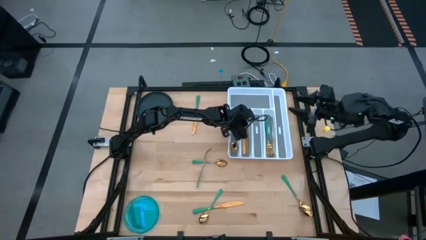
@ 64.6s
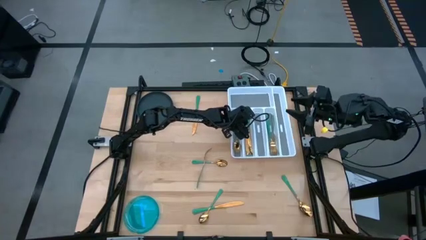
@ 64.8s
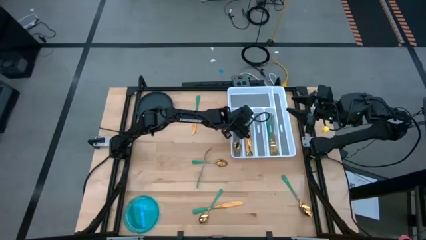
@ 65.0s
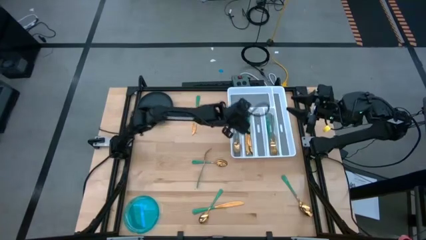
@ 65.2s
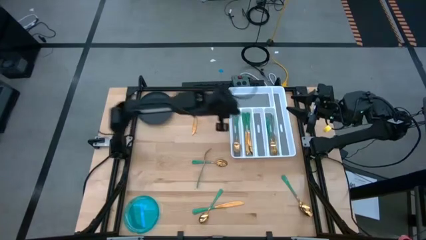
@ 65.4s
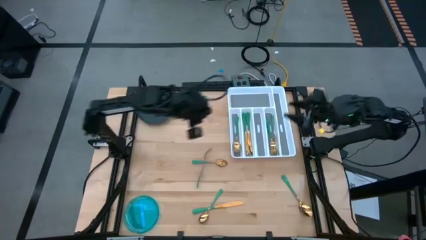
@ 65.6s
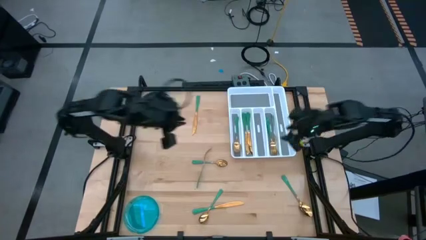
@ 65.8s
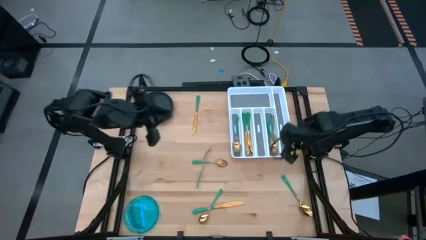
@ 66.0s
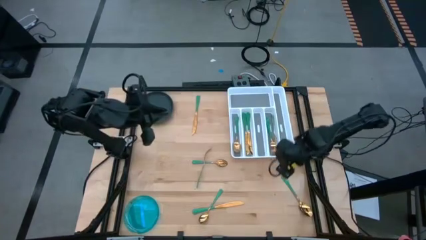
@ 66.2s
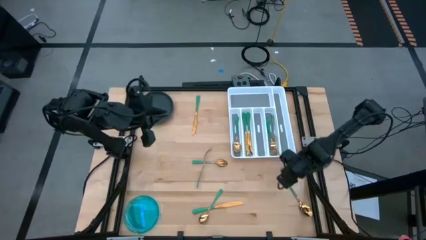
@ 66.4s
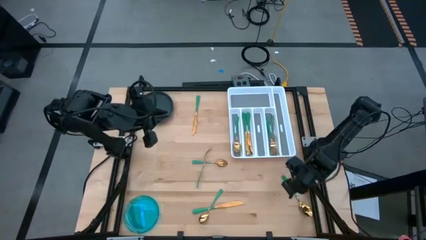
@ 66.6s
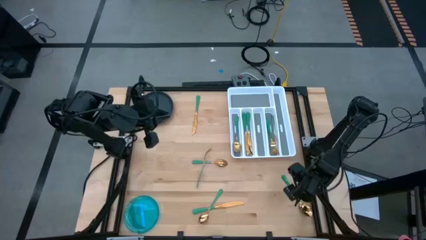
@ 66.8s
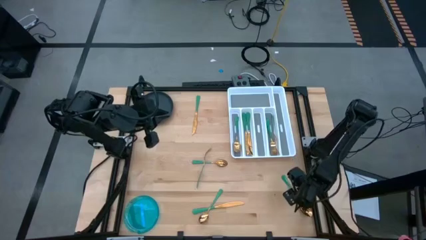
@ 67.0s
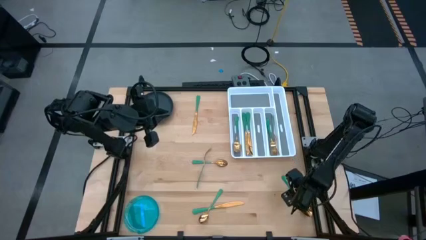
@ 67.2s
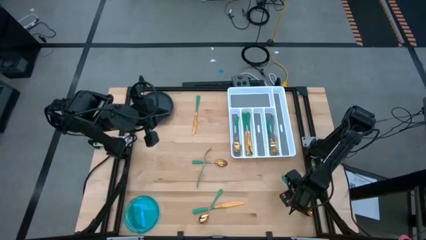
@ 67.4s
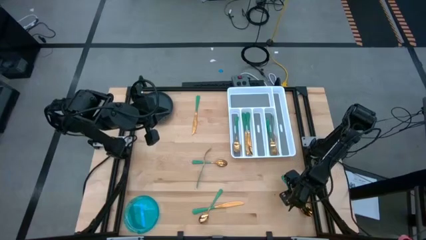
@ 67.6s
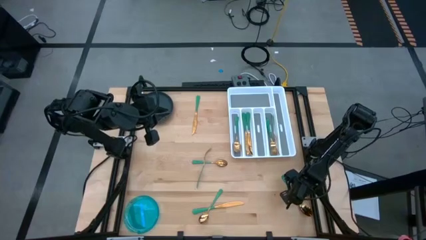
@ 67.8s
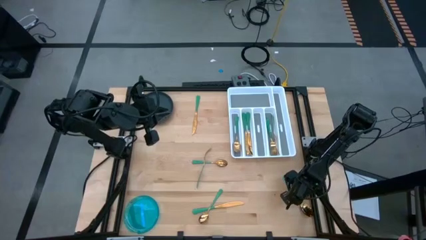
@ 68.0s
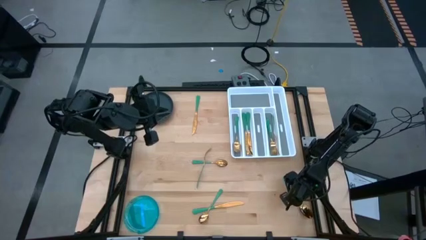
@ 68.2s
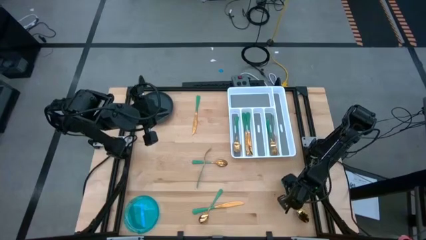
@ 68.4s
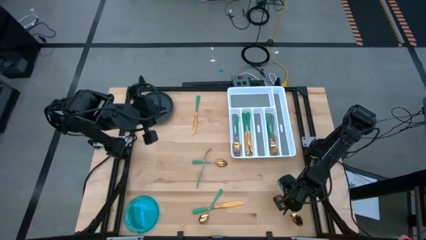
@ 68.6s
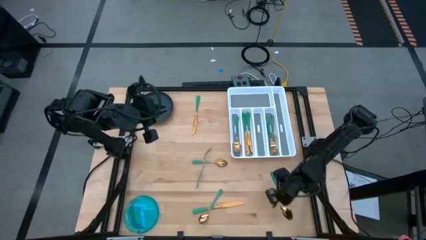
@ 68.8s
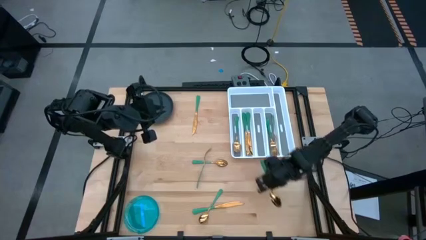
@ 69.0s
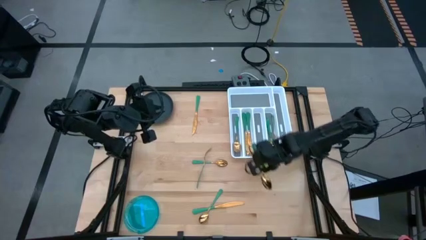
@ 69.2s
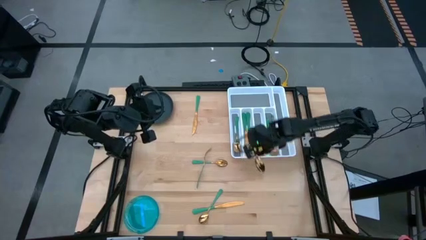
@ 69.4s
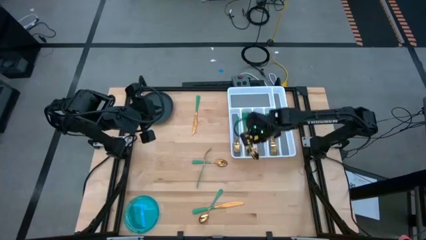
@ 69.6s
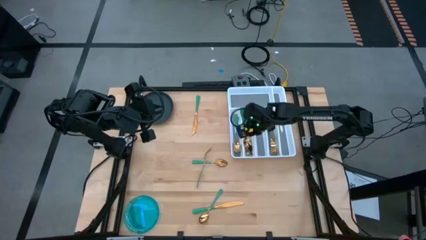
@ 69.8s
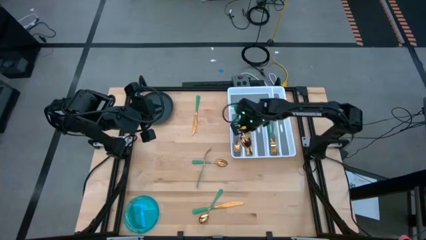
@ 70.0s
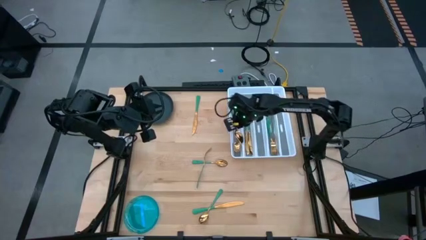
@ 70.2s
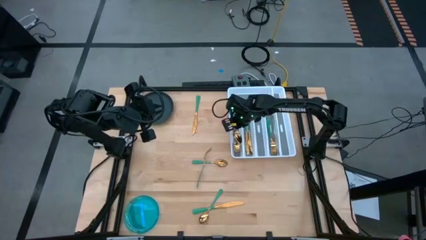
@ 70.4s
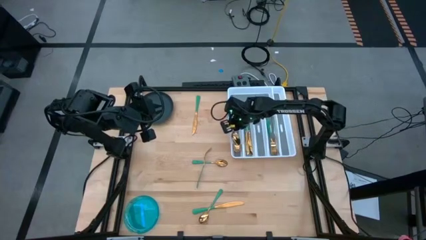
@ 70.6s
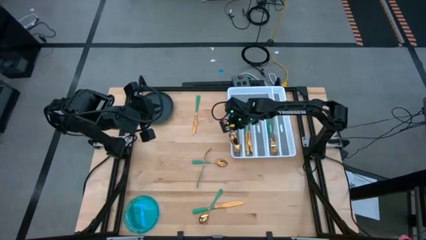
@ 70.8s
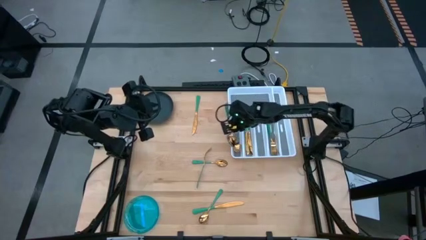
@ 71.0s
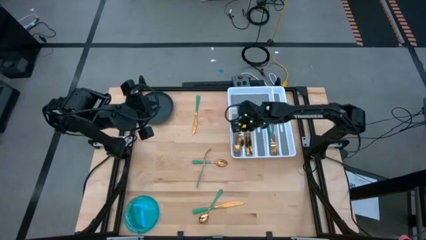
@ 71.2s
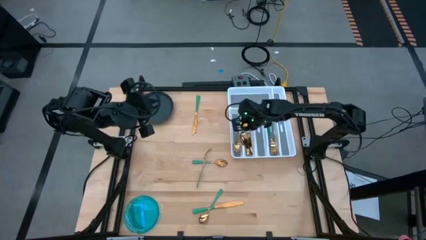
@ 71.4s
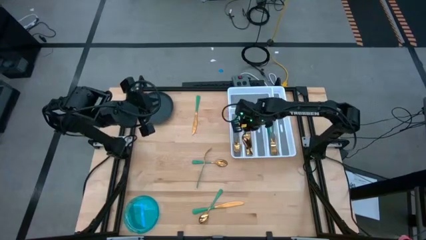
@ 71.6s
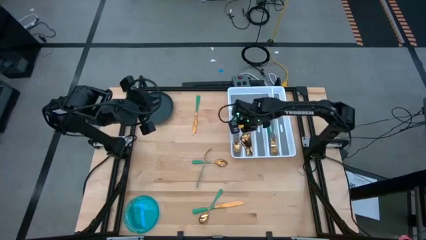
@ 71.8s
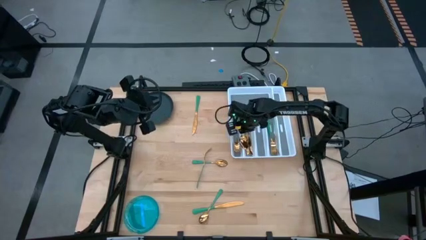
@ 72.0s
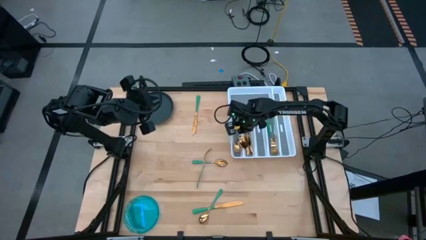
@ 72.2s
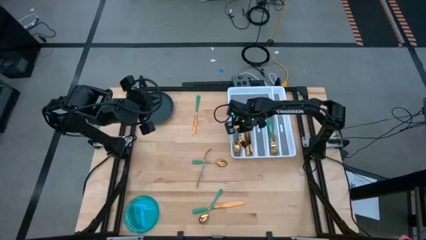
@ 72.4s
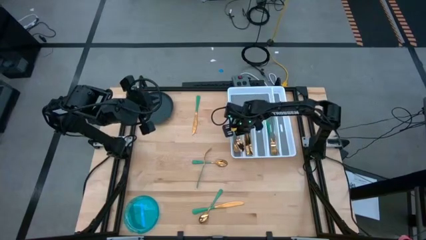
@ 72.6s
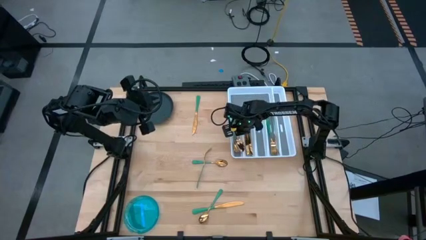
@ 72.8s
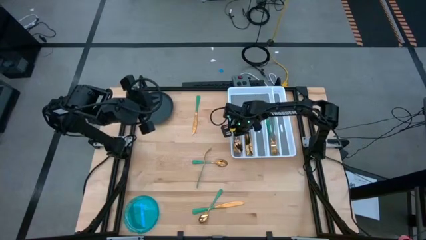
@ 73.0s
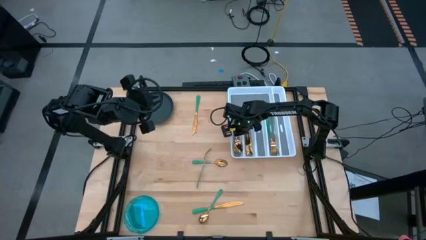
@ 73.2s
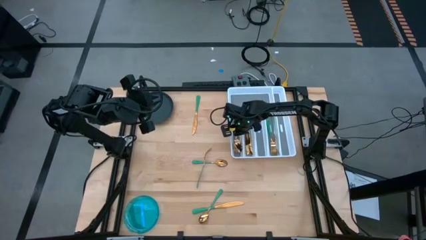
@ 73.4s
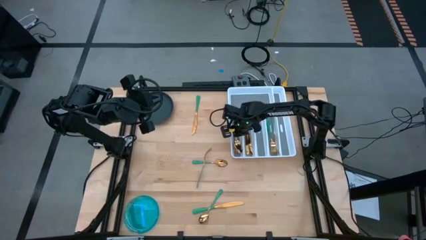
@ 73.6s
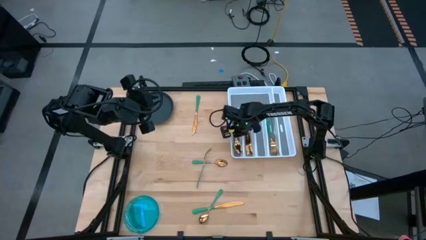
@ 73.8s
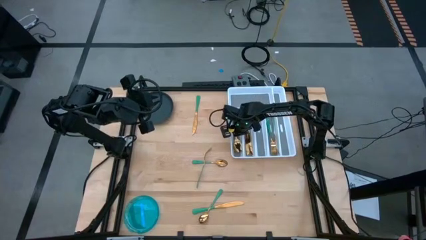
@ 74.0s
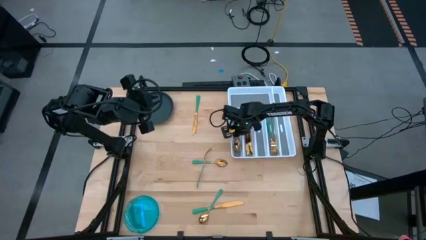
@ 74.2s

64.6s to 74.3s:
Task: Sort silverware
Put the bottom right green spoon on the silverware tray with the other green spoon

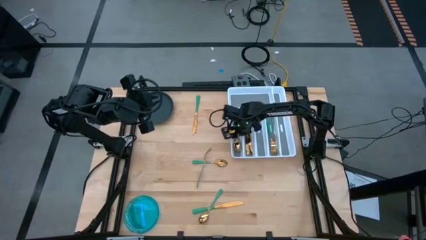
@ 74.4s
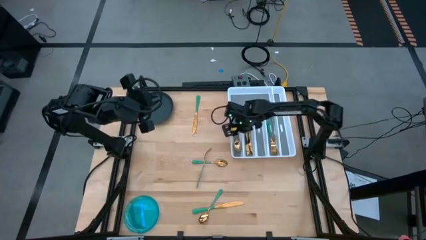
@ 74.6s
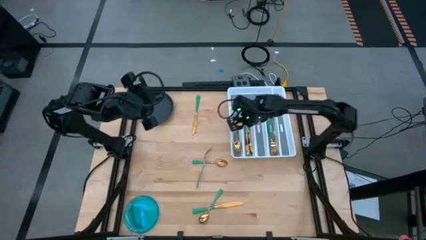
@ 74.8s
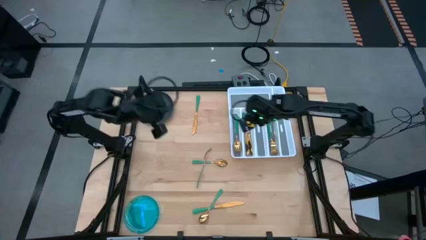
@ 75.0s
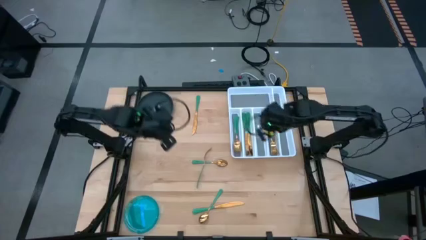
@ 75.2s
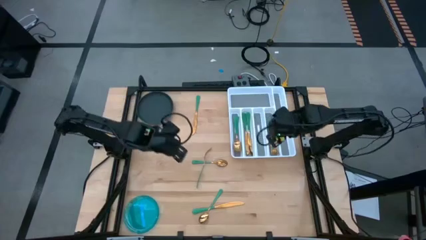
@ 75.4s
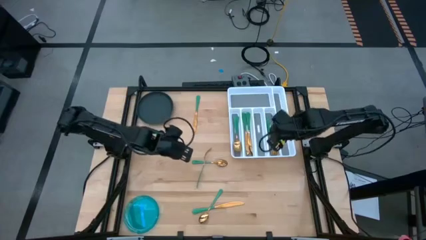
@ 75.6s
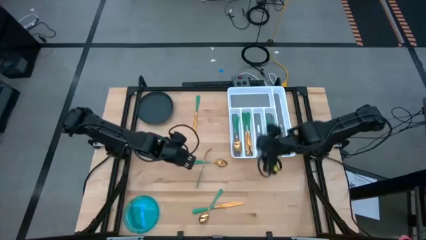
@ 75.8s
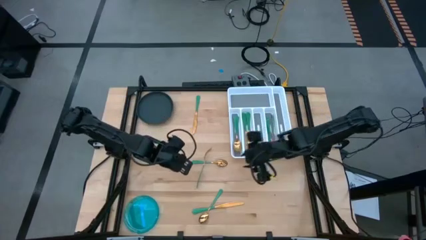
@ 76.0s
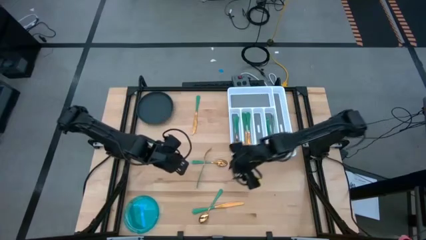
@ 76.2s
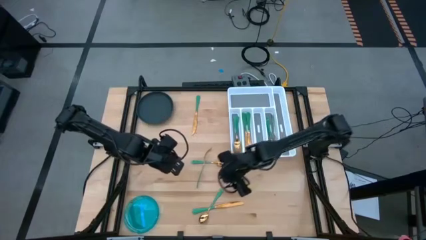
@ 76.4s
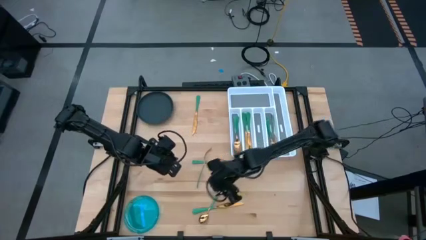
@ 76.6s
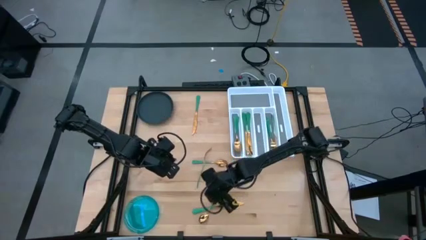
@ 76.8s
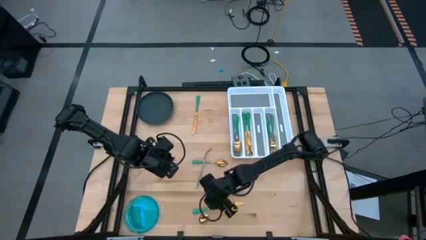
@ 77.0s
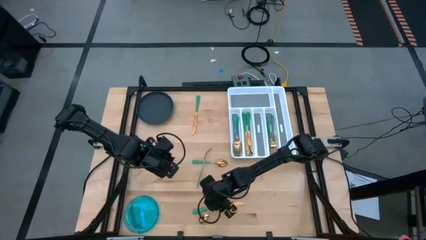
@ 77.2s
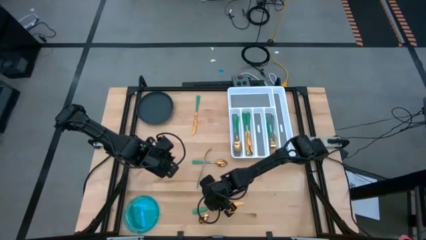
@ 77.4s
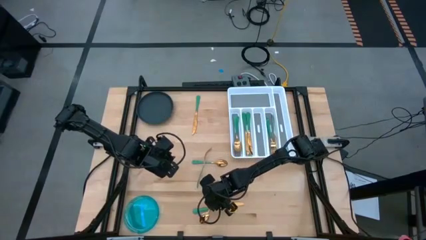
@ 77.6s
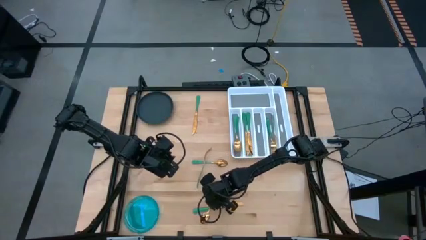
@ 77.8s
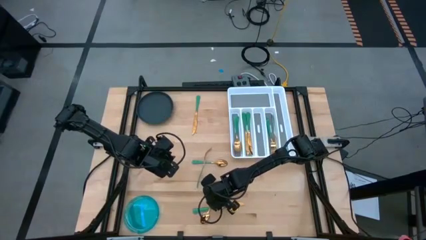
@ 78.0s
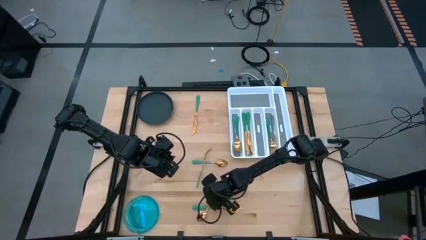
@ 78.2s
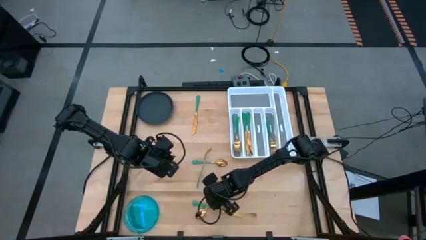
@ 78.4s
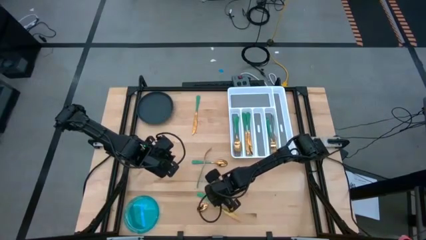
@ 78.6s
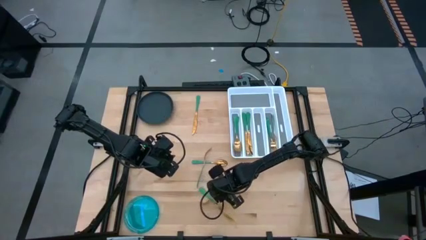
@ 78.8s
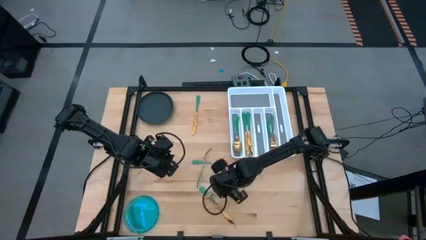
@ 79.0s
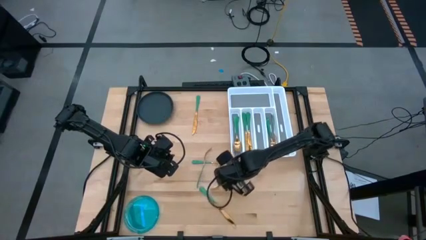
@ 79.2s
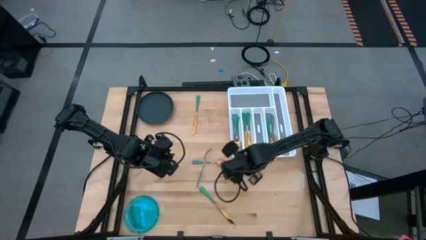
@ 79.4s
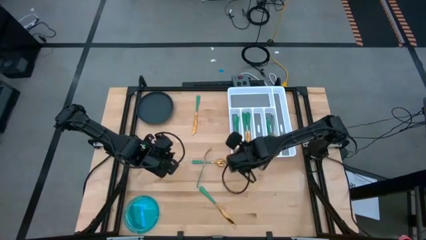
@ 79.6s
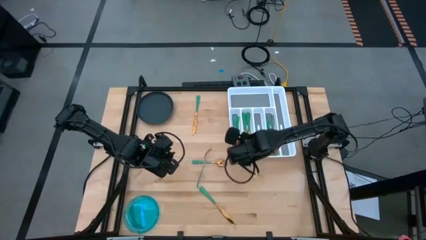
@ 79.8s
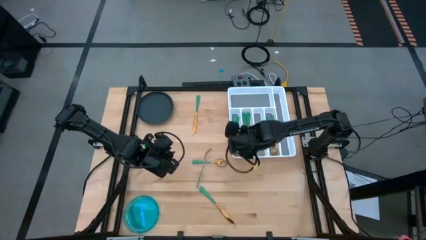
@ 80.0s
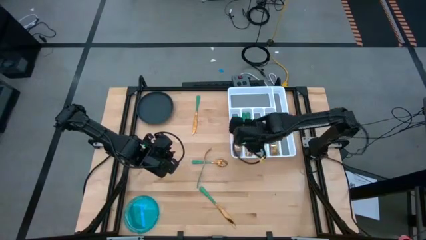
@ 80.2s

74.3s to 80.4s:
Put the bottom green spoon on the silverware tray with the other green spoons
